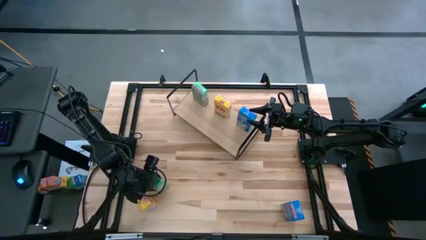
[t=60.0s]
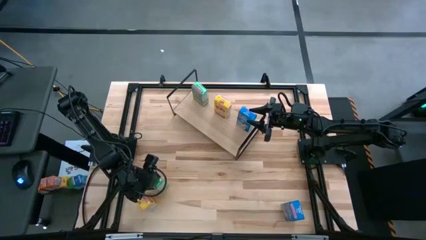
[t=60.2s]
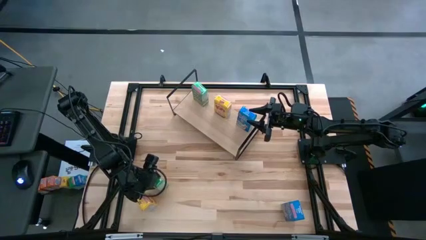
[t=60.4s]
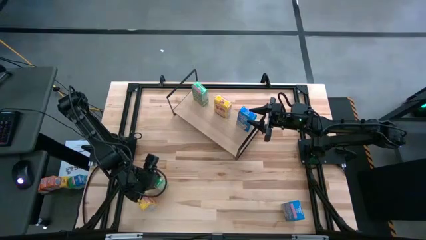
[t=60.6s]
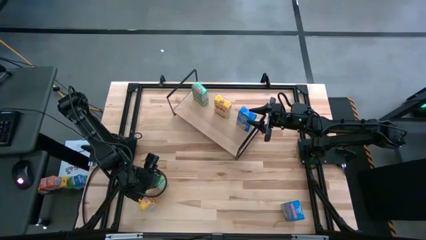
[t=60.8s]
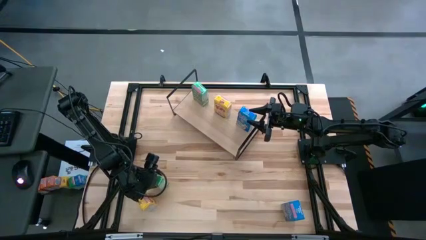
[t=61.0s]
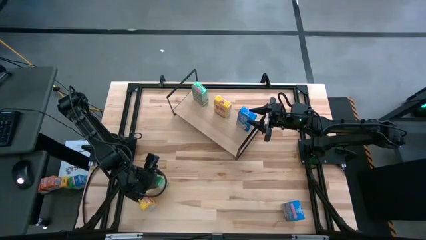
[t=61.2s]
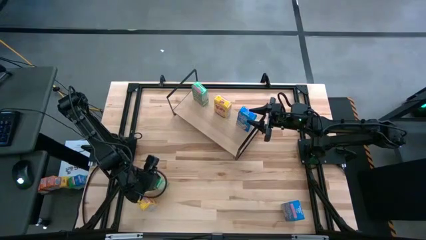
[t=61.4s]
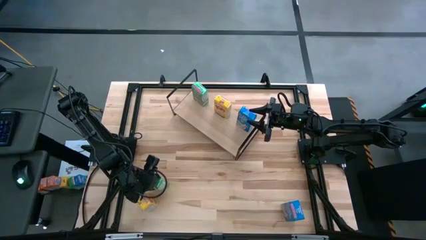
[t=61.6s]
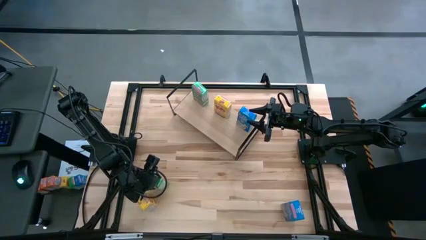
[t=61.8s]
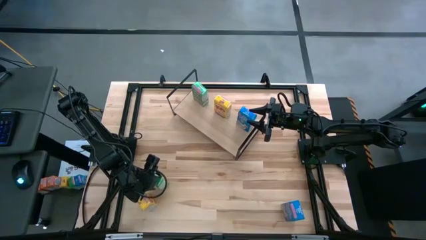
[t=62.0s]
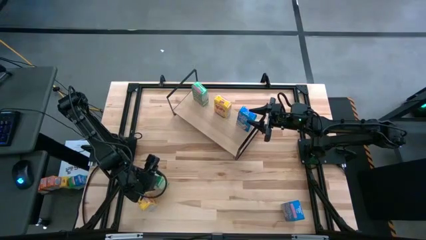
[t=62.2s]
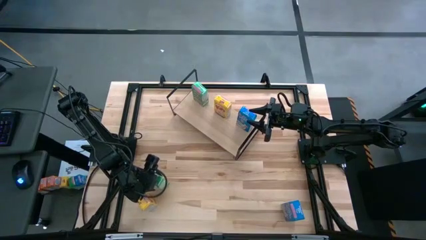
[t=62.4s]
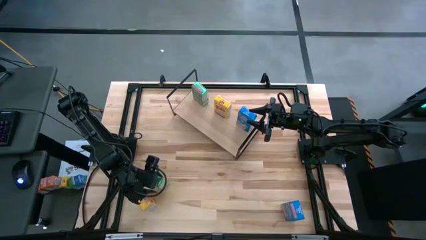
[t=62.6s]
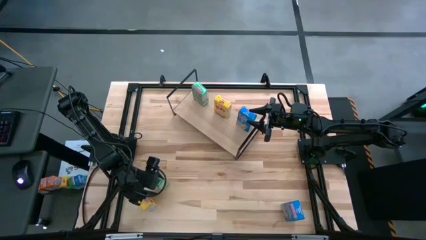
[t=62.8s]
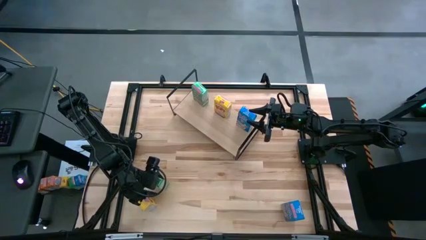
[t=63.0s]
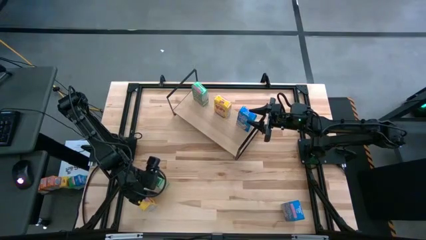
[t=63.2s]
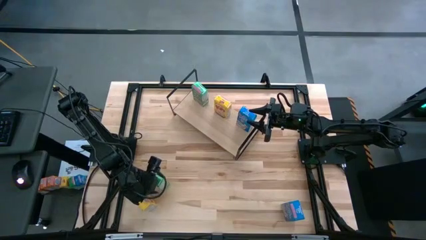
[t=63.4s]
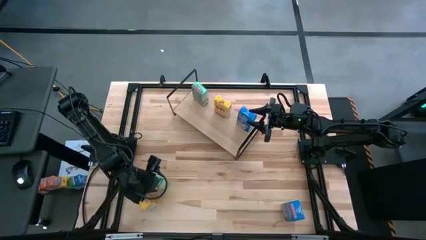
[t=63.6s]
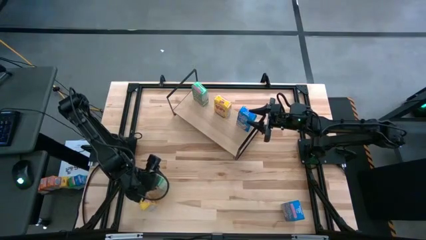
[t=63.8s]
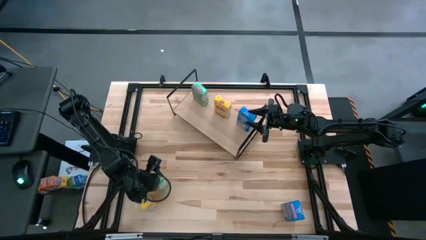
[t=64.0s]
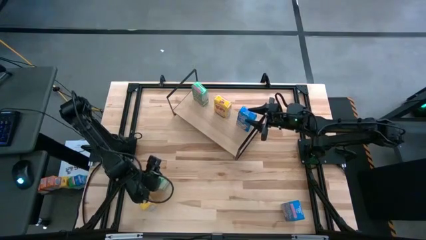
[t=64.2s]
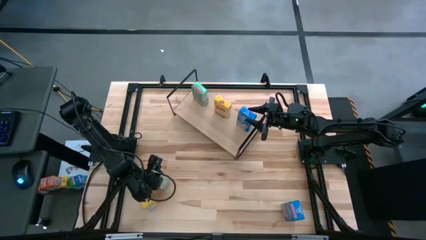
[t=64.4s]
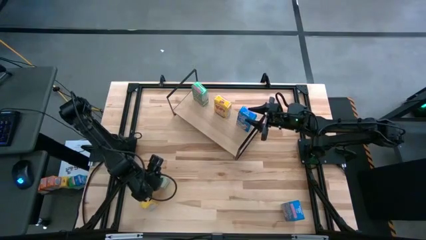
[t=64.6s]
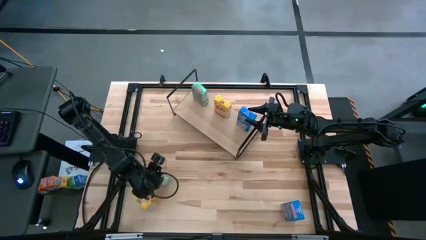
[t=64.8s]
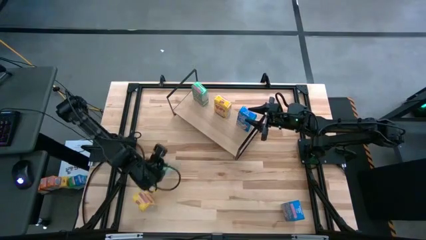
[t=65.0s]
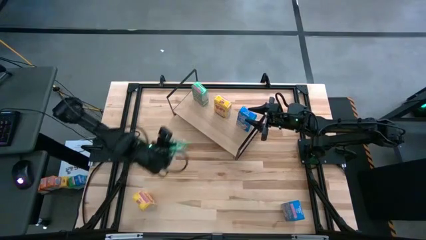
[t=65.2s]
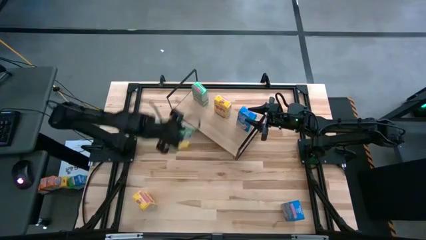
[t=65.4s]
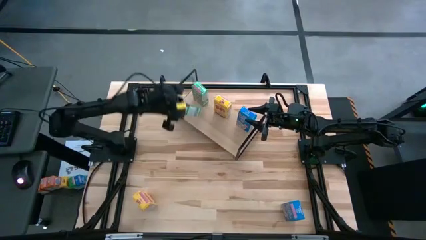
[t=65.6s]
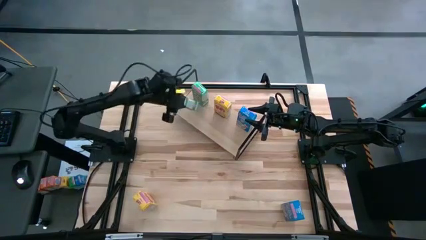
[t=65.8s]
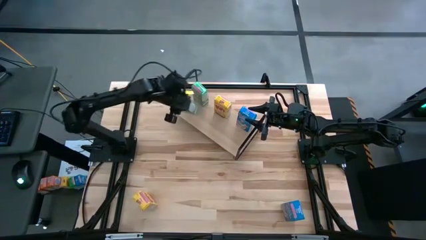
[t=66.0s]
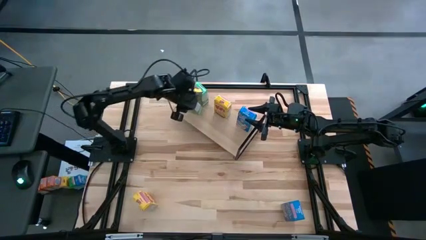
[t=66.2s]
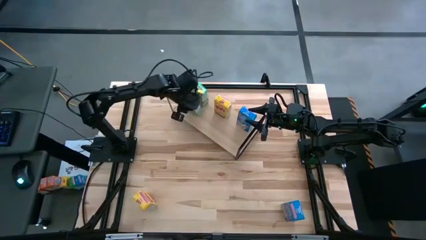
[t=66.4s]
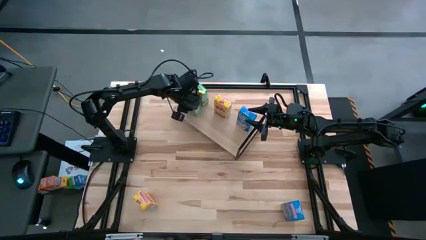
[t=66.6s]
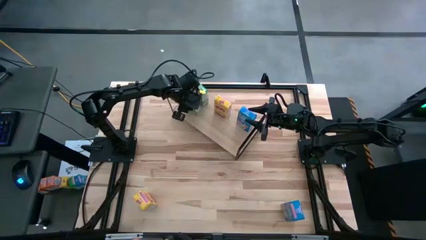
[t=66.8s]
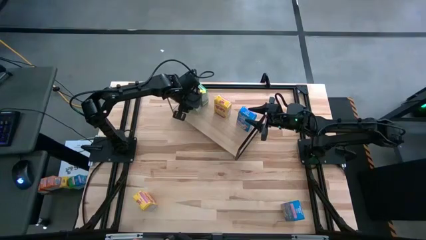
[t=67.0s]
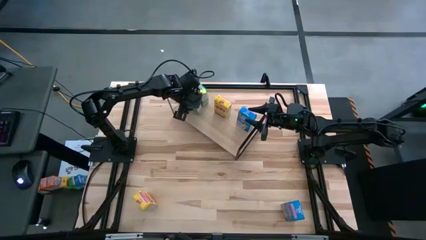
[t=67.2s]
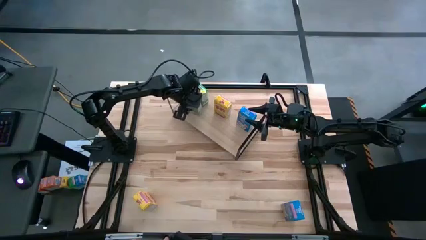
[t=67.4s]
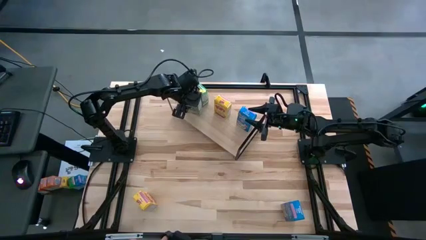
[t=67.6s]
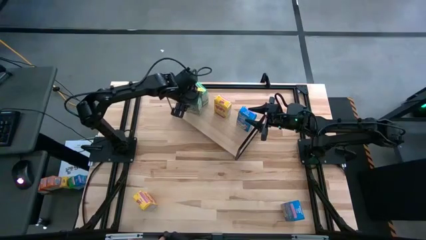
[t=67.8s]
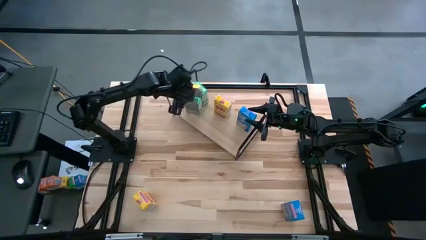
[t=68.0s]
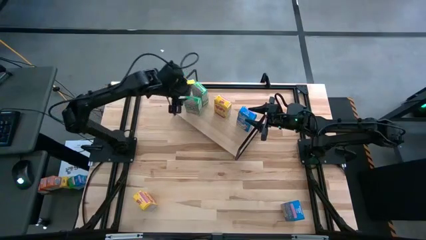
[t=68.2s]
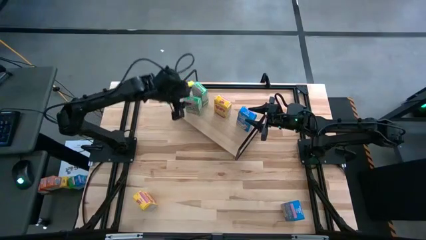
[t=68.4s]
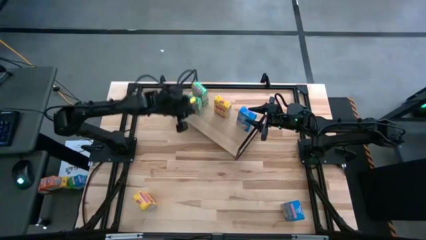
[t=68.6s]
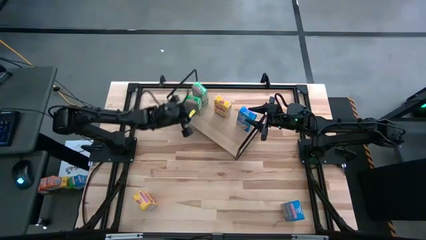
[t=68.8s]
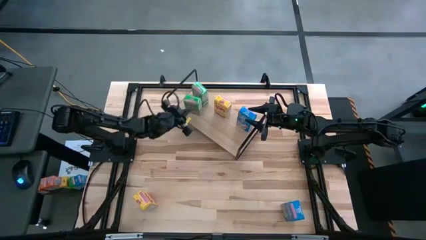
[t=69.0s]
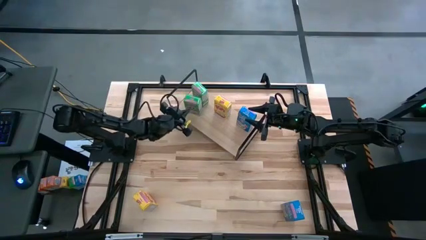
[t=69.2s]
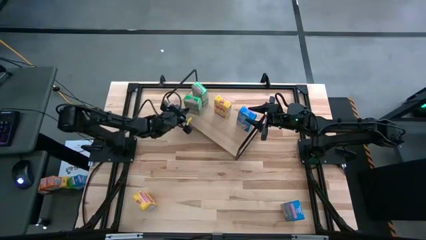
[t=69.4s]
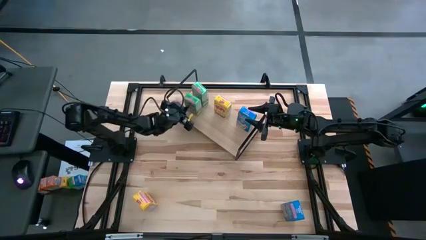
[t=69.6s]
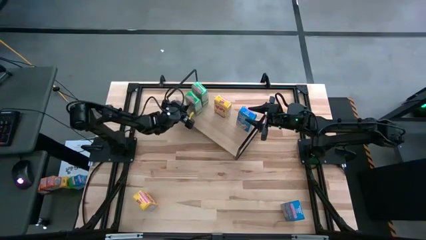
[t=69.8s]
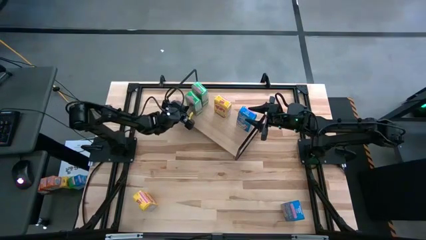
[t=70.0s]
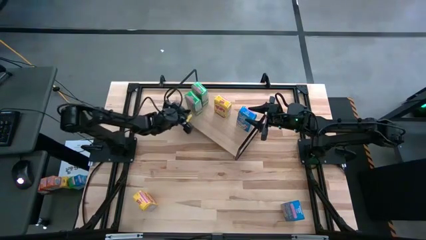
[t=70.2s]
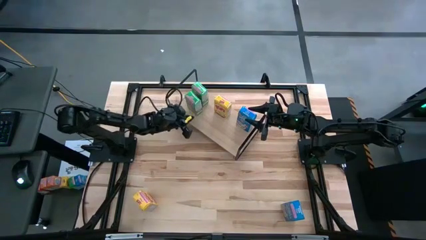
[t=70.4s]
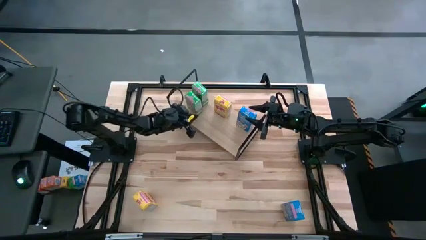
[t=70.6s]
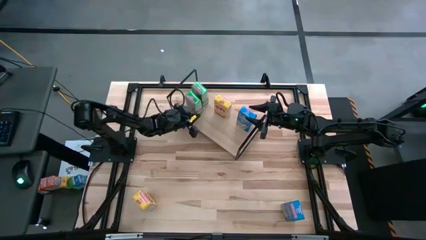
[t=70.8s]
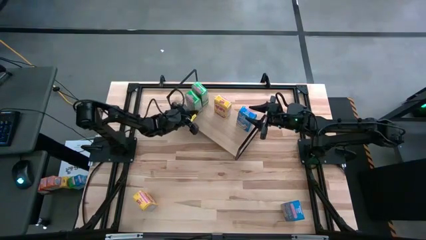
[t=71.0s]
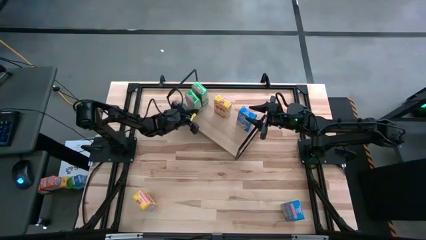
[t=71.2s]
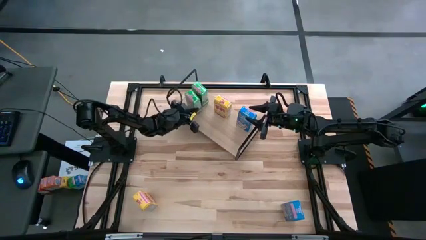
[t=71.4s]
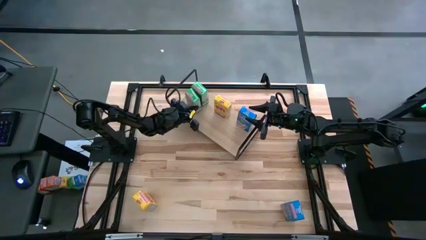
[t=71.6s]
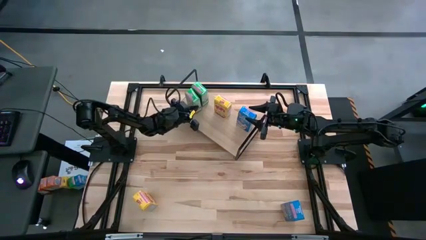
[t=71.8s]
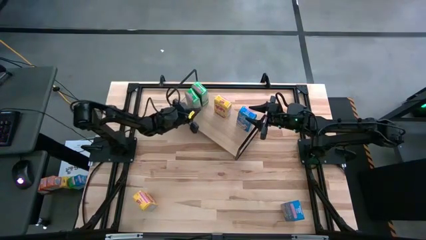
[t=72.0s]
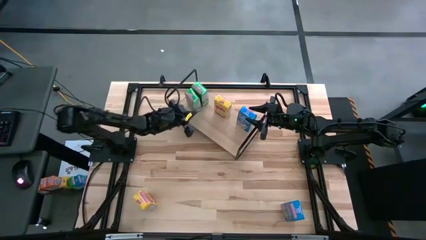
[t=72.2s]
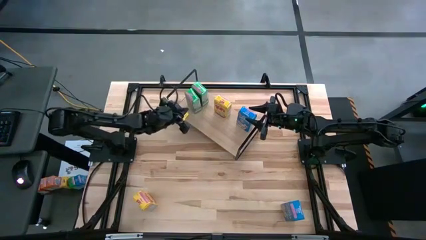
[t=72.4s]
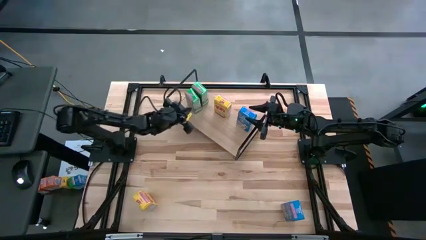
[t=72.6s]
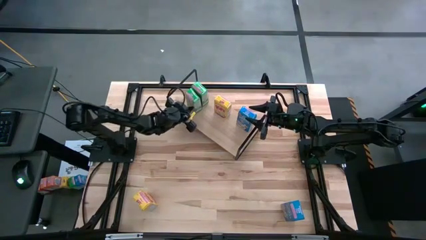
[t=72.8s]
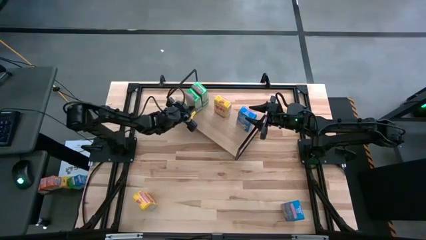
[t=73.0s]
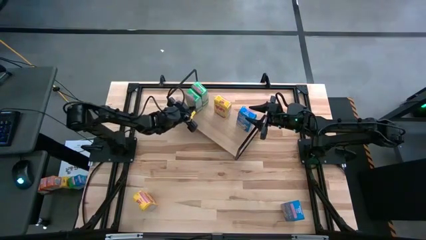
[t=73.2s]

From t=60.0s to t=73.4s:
Task: Stack cereal on shelf
Put the green cereal box on the shelf aligned with the other green cereal box

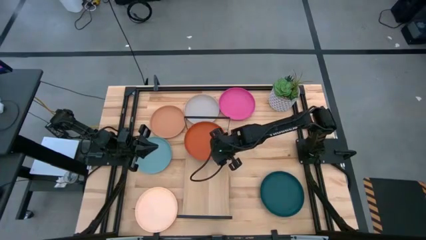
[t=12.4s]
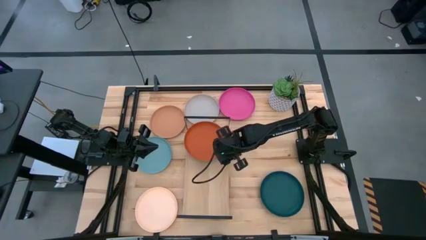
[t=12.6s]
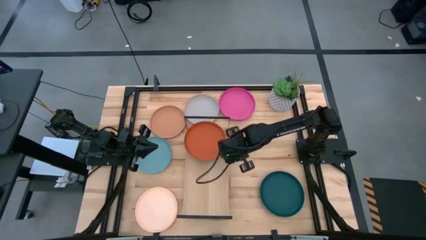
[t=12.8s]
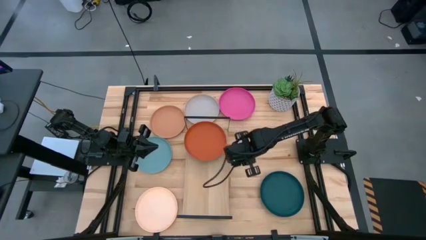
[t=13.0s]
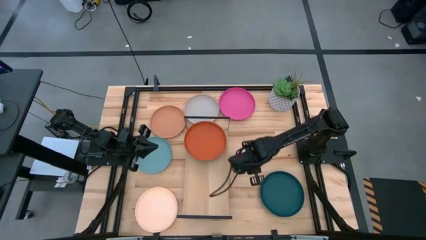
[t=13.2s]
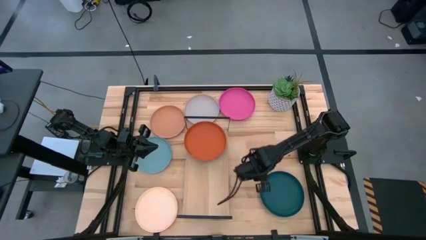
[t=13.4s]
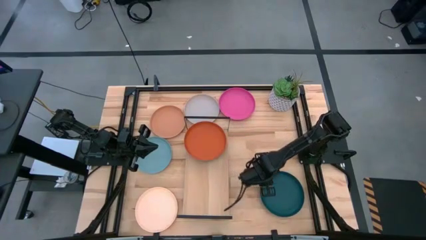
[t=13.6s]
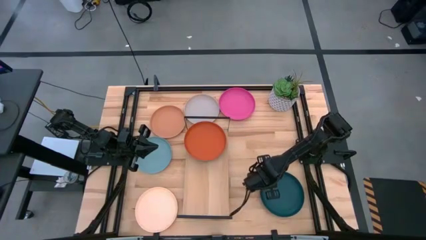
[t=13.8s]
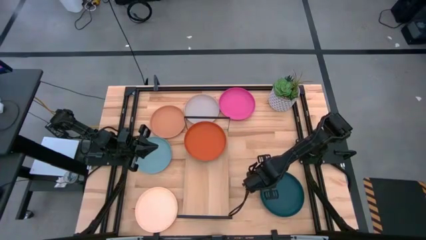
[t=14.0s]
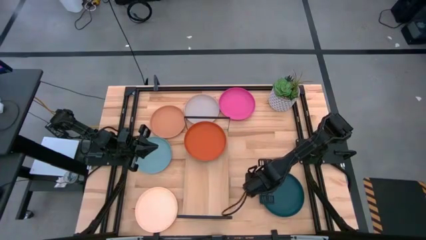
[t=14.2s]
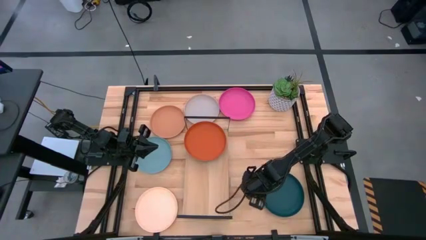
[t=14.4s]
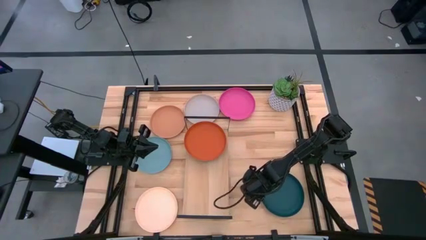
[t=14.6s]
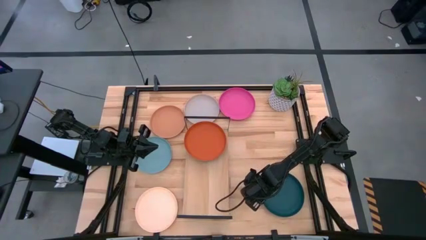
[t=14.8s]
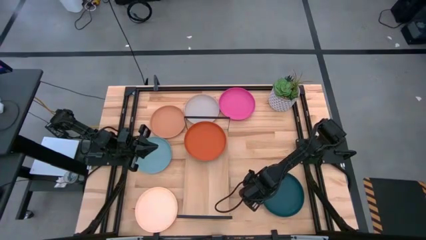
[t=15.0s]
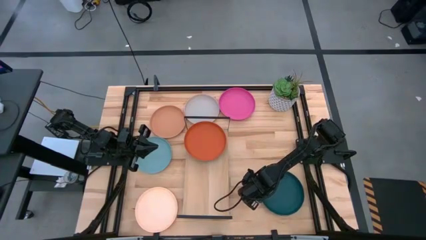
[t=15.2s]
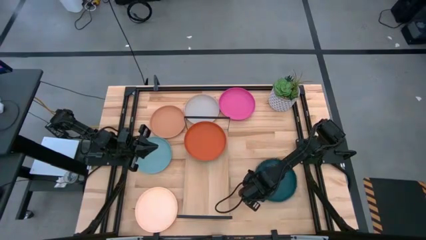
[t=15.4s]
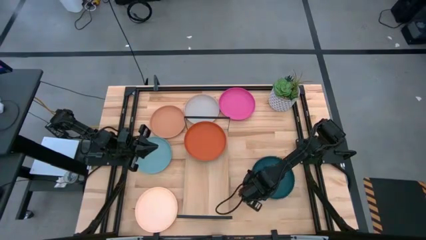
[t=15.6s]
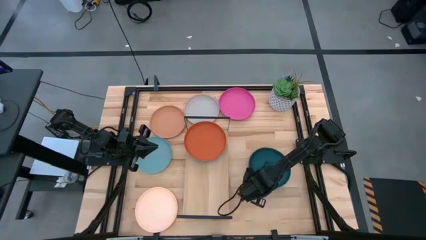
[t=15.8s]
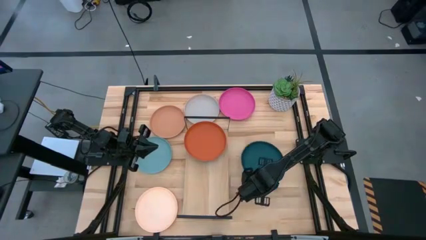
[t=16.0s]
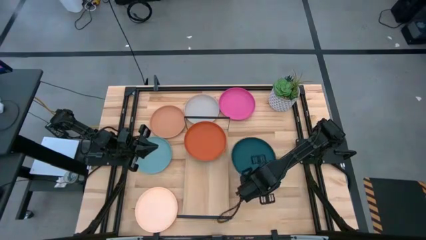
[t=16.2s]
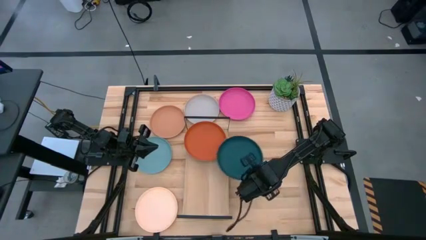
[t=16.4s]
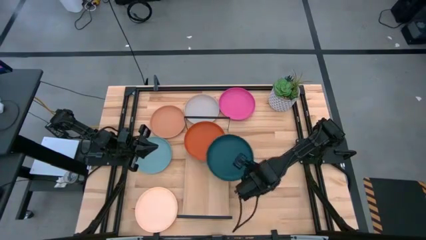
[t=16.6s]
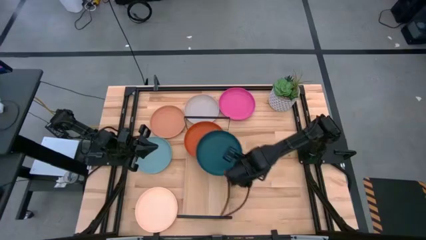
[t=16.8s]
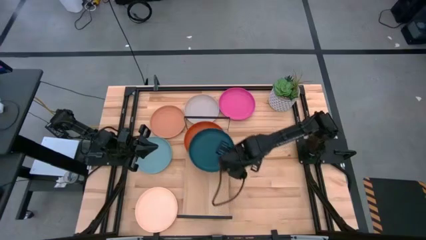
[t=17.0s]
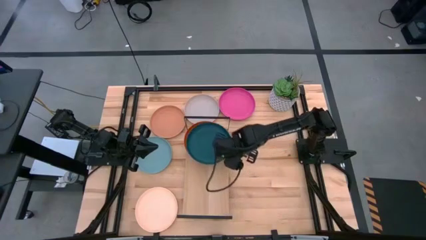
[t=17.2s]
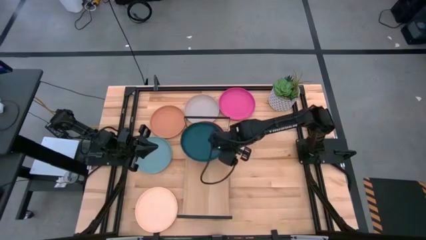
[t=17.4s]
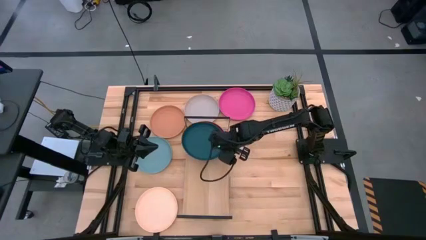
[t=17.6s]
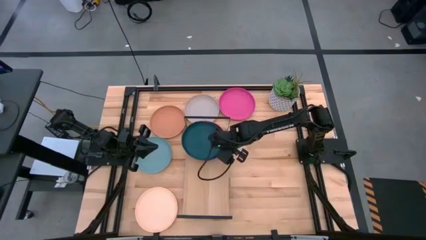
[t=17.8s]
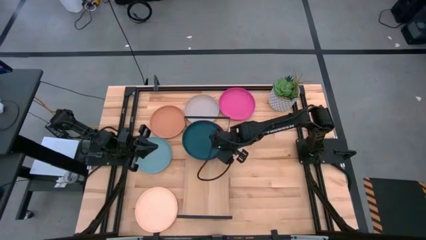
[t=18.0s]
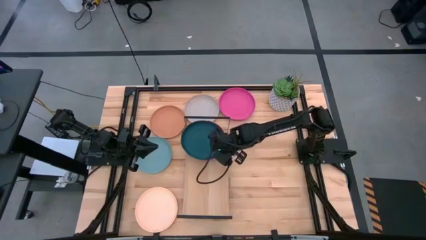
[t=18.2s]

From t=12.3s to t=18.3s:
Task: Place and stack plates onto a shelf
Stack the dark green plate on top of the orange plate
